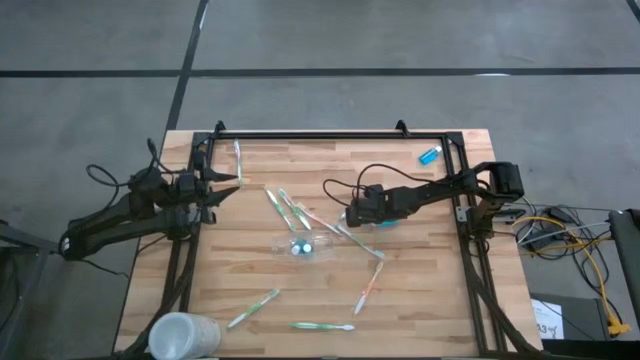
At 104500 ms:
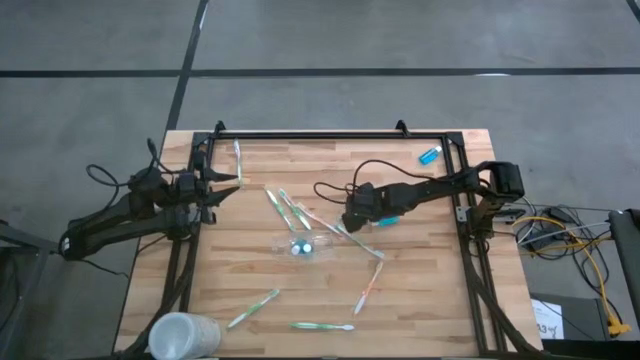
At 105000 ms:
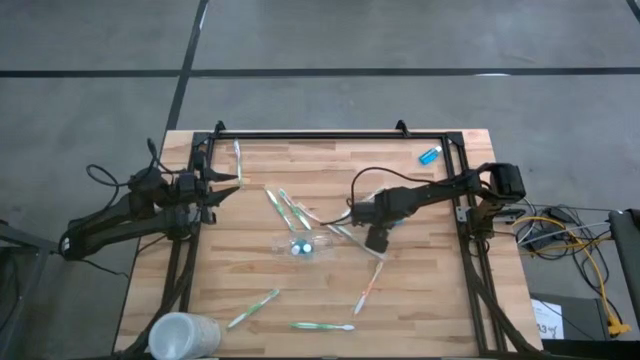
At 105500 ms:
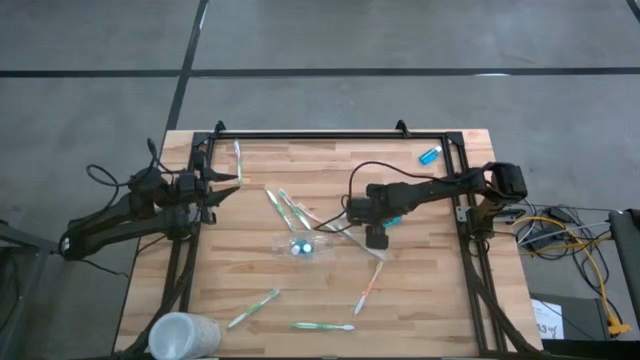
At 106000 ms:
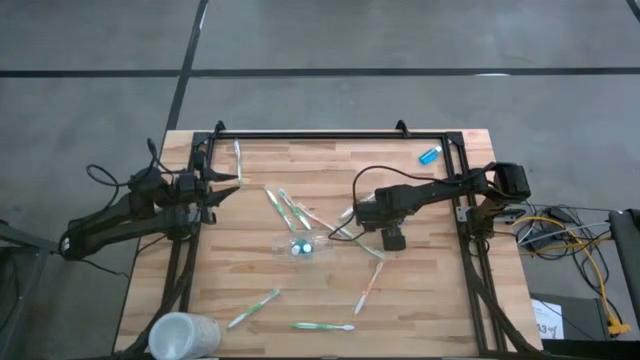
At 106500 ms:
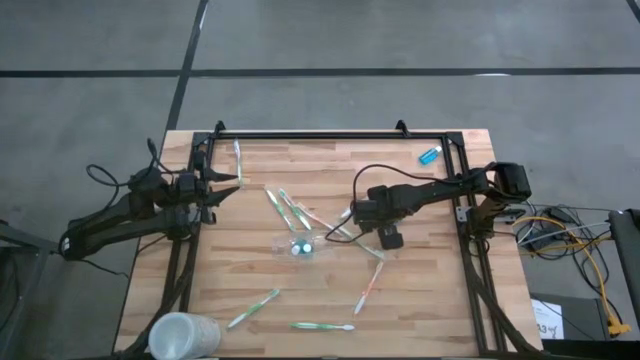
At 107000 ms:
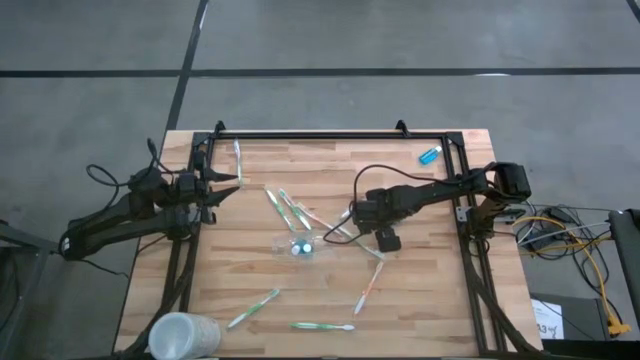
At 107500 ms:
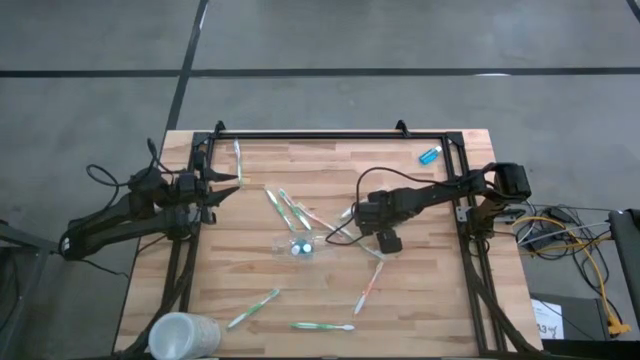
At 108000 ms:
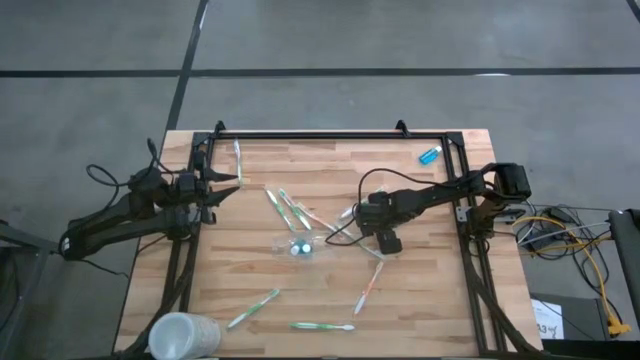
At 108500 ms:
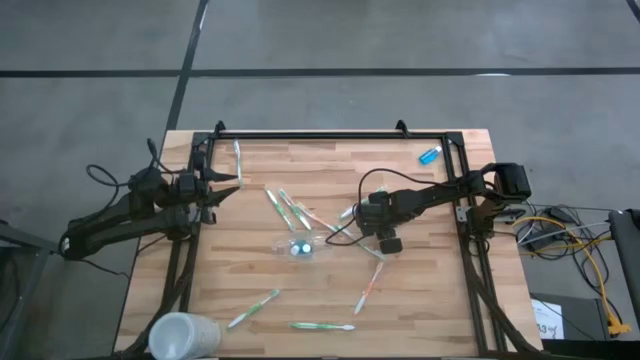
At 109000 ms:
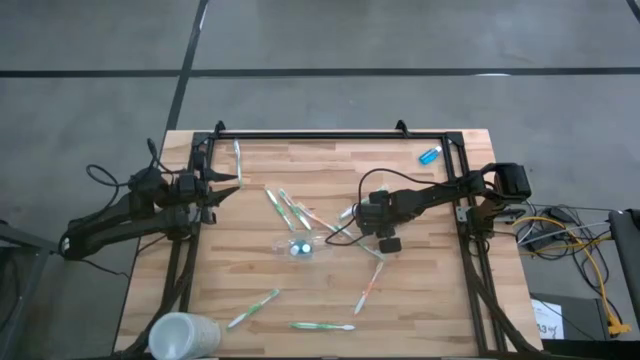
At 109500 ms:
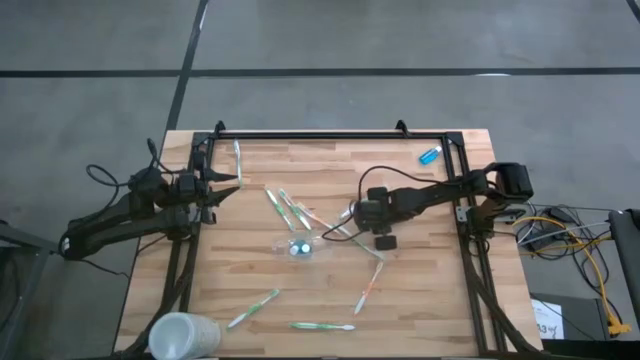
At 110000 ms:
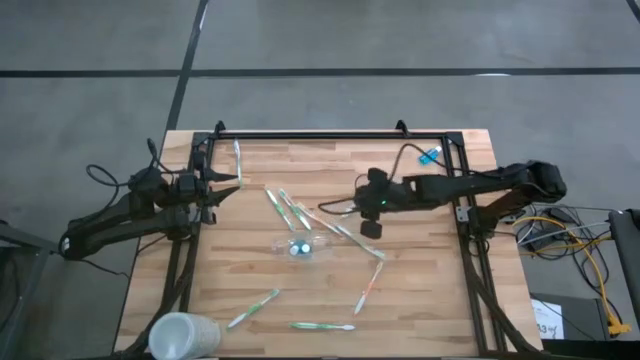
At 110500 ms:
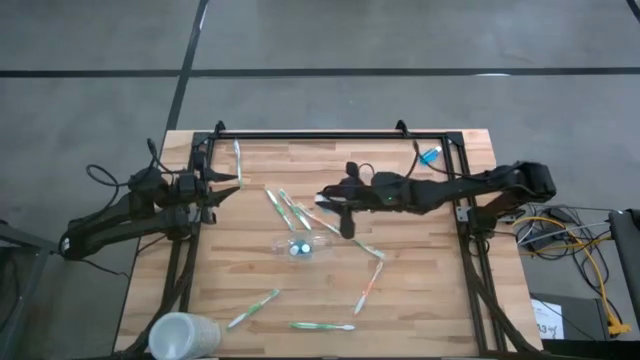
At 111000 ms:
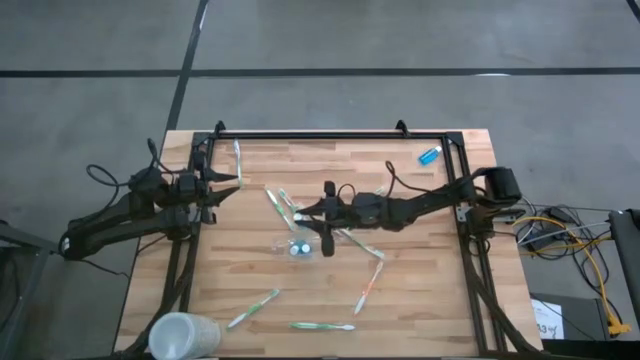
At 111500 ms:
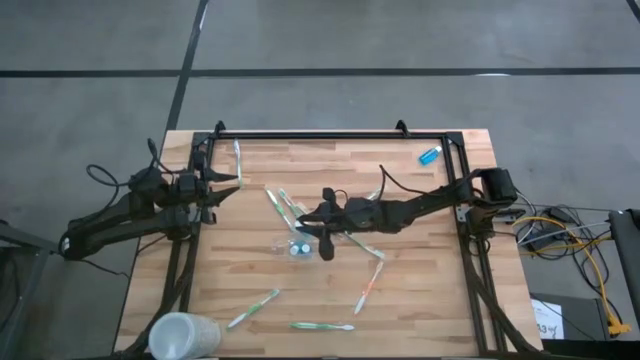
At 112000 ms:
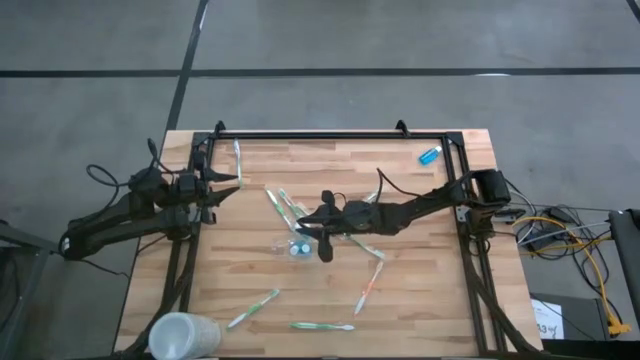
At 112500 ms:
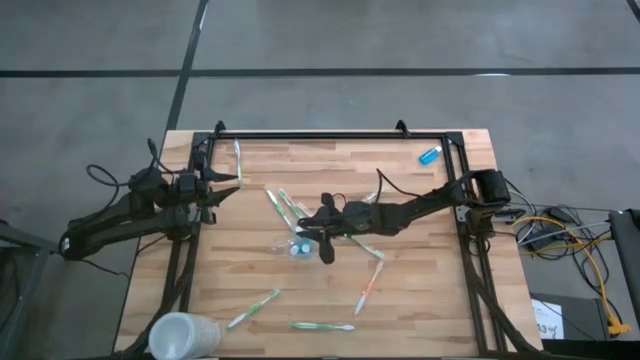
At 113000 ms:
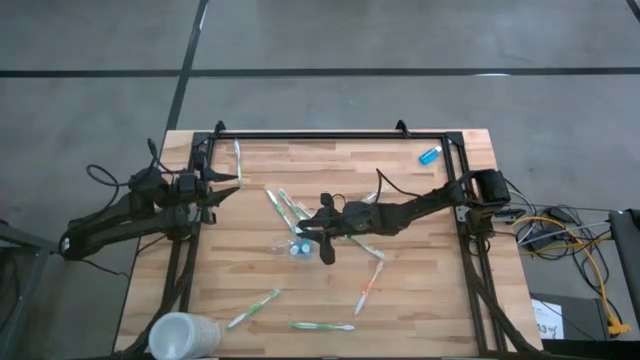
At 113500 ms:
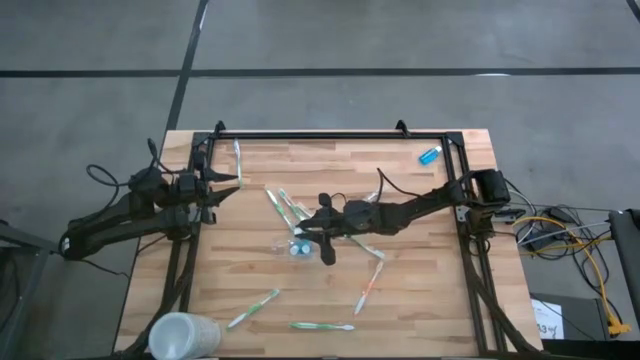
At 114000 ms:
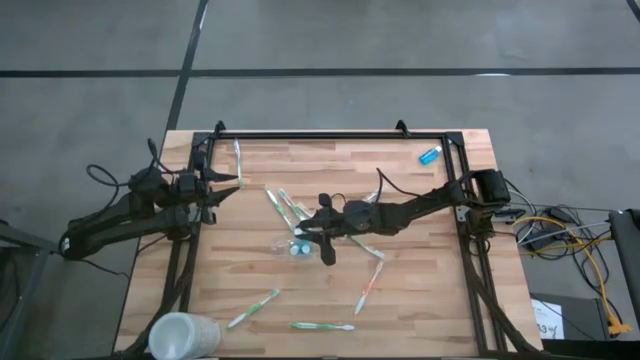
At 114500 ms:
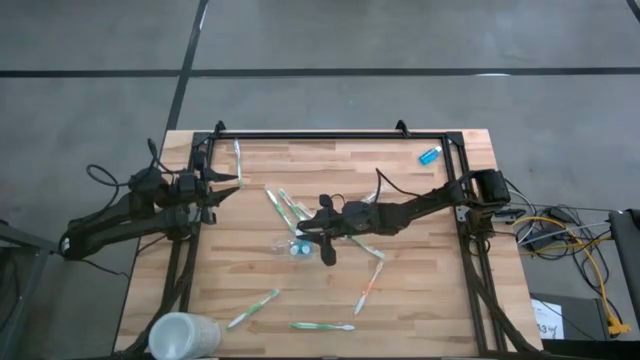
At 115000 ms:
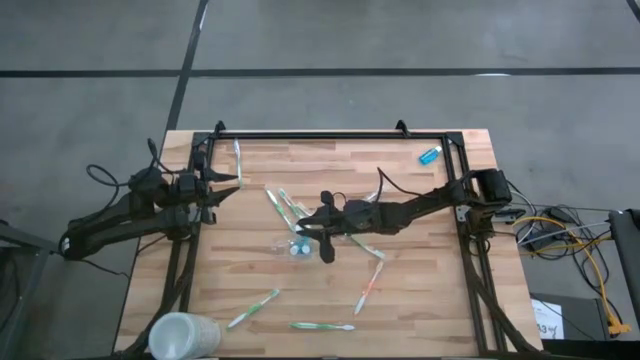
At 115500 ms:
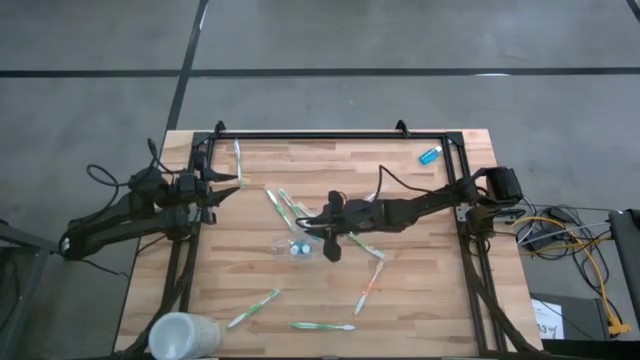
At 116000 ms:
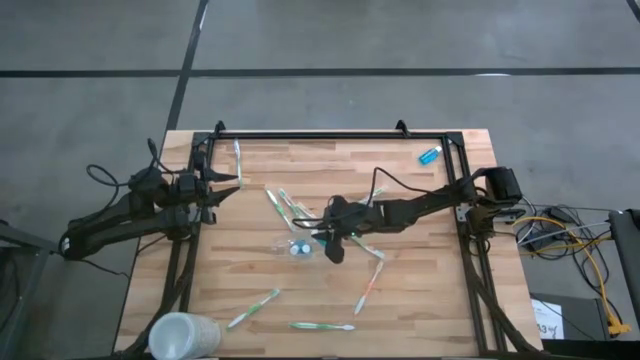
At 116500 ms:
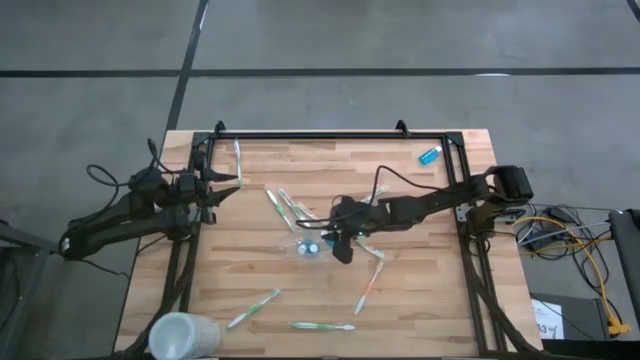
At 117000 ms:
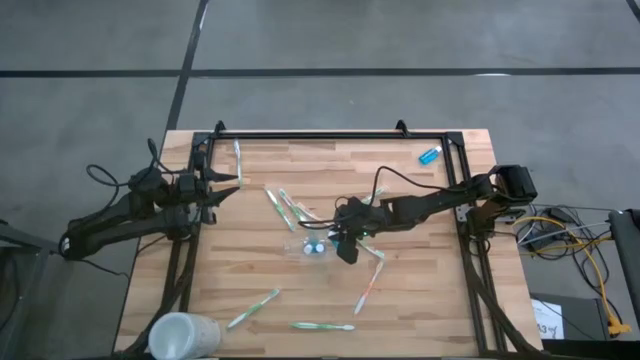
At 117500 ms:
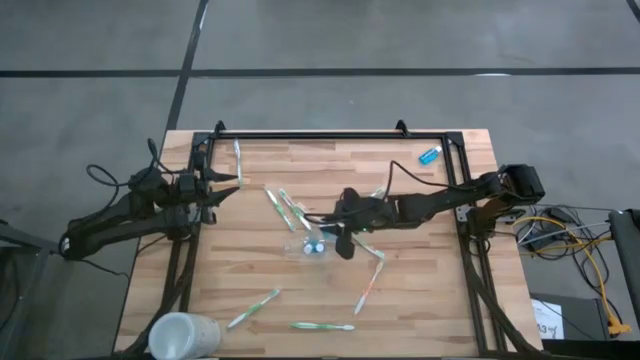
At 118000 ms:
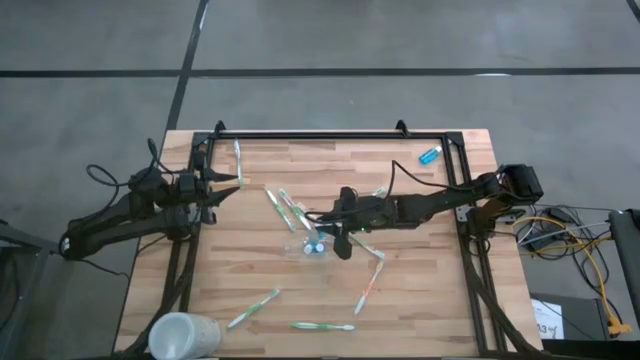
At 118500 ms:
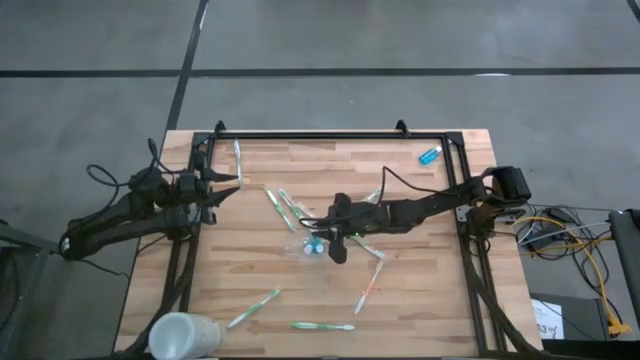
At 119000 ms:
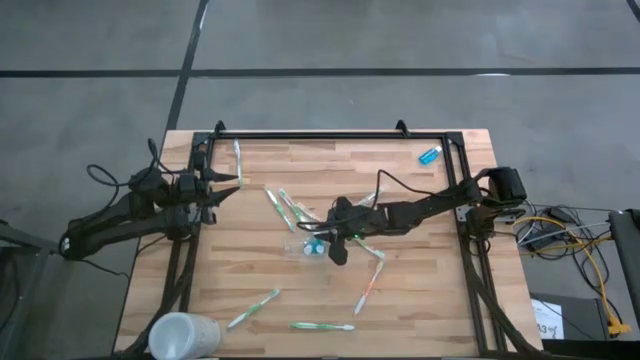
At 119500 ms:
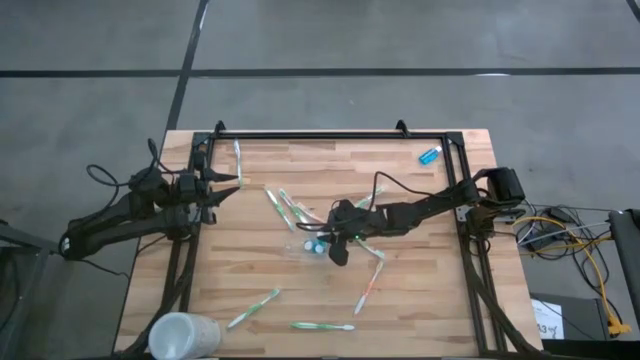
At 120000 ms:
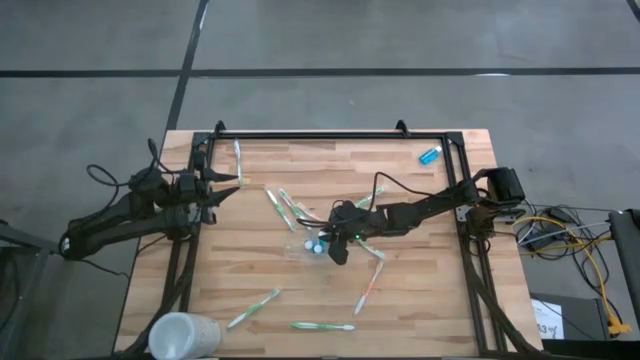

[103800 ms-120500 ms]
Task: Pick & Place toothbrushing station
Put the blue mouthwash bottle into the transparent organizer
